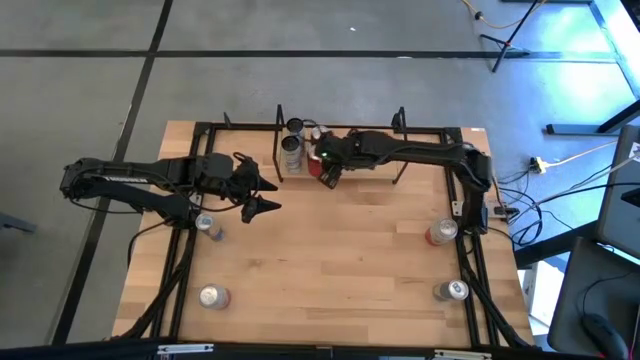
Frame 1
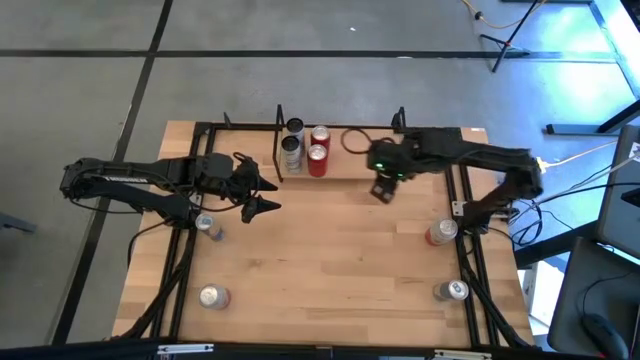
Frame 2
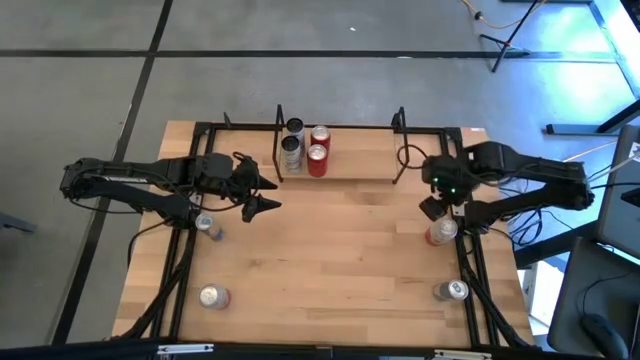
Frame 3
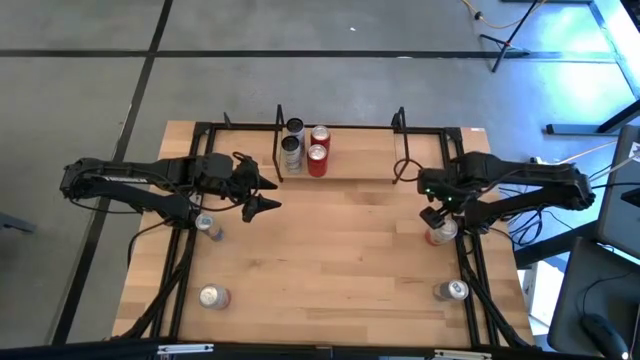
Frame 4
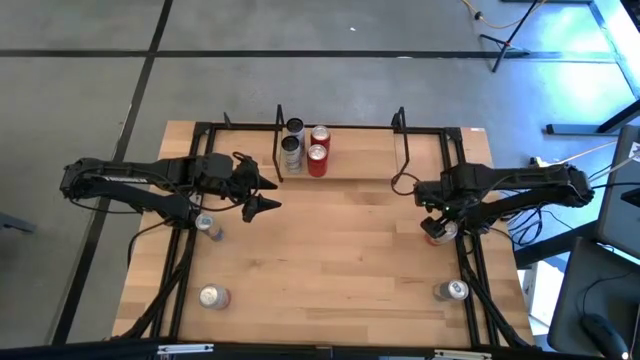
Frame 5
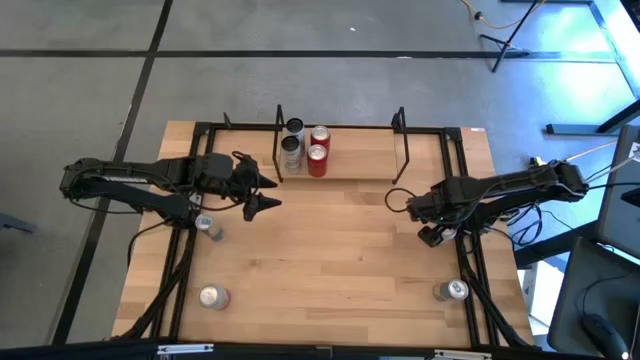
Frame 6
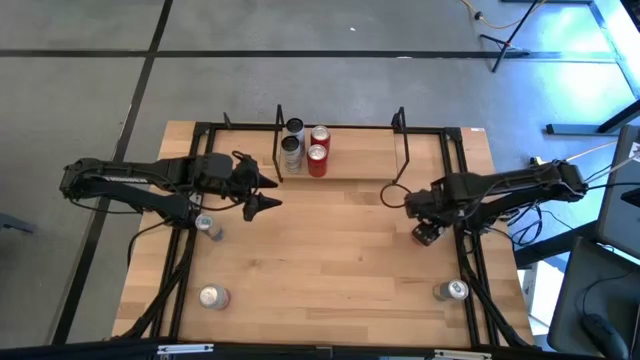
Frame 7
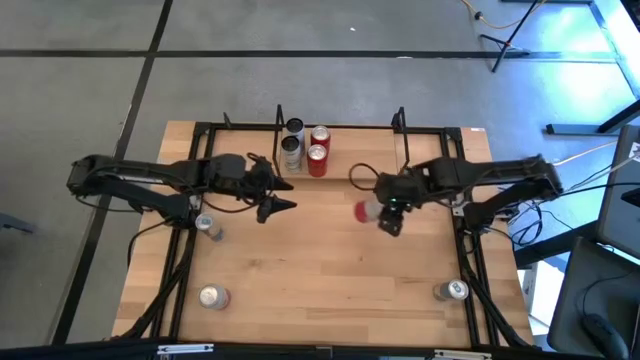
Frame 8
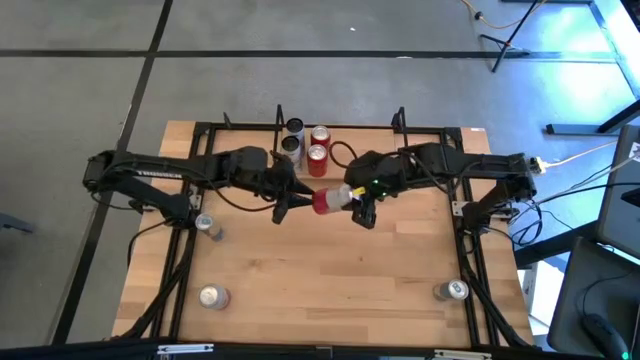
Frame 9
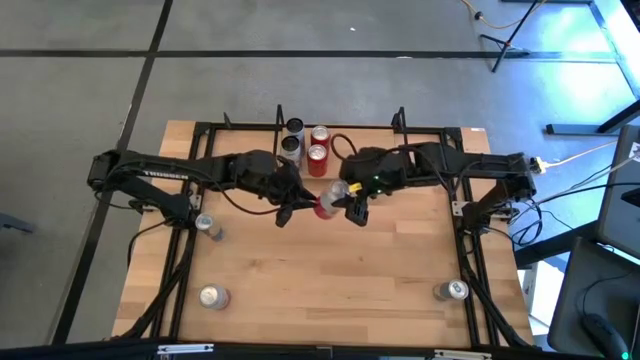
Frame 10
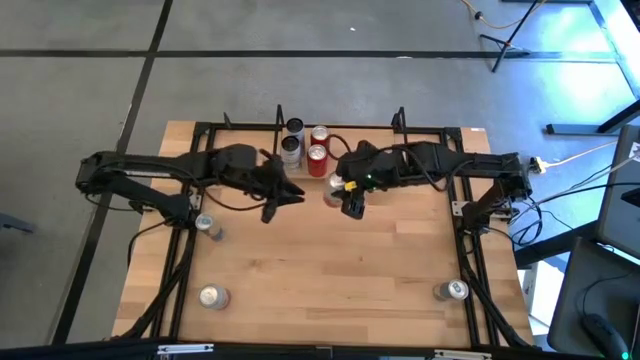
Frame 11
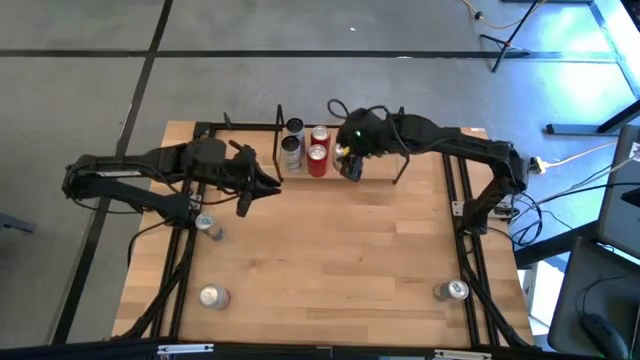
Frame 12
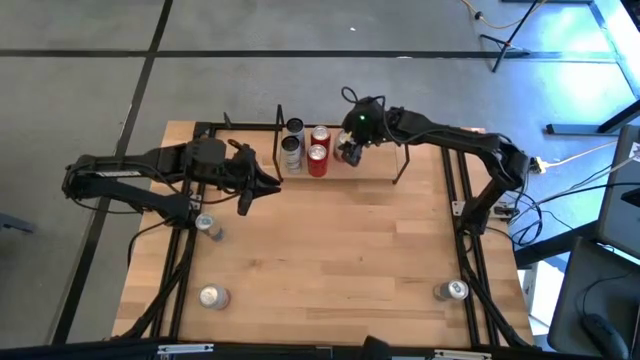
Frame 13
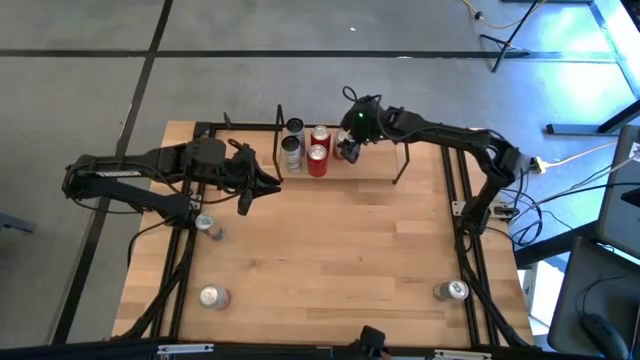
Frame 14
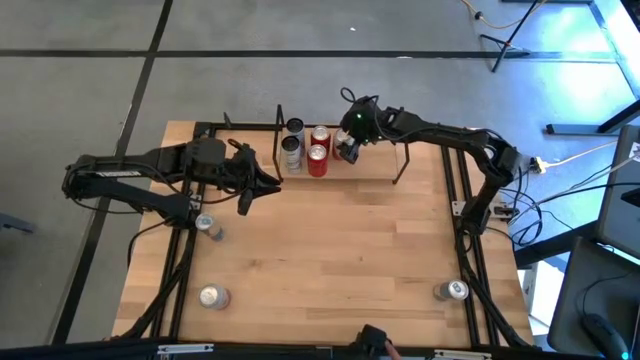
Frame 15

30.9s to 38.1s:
Task: Place canned beverage on shelf
Put the right pink soda can on the shelf

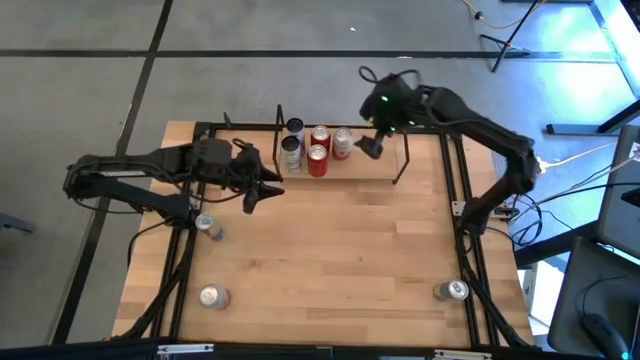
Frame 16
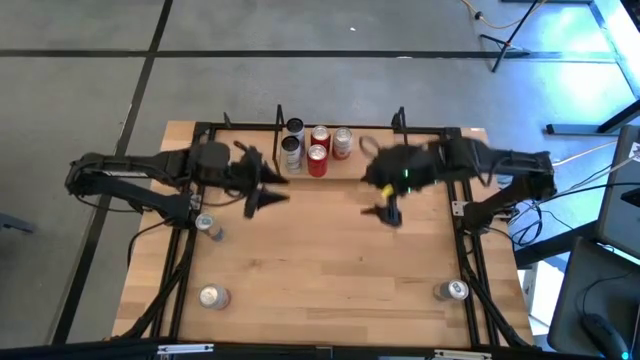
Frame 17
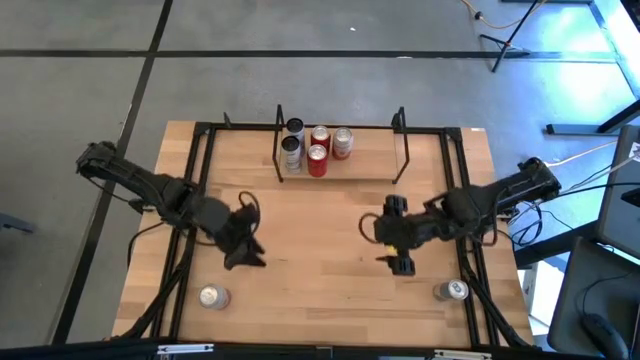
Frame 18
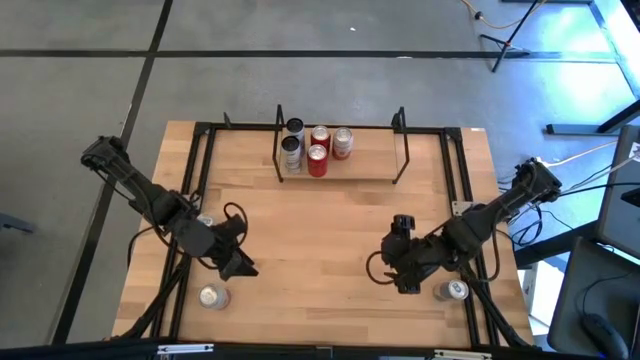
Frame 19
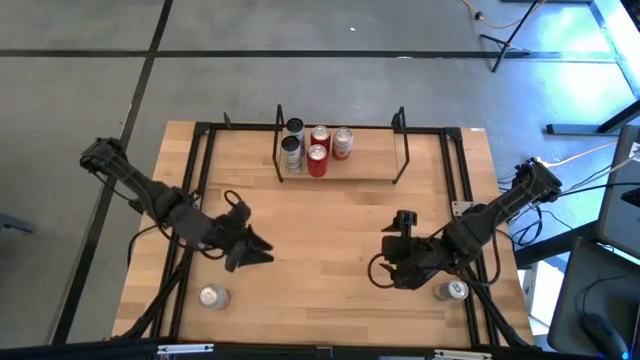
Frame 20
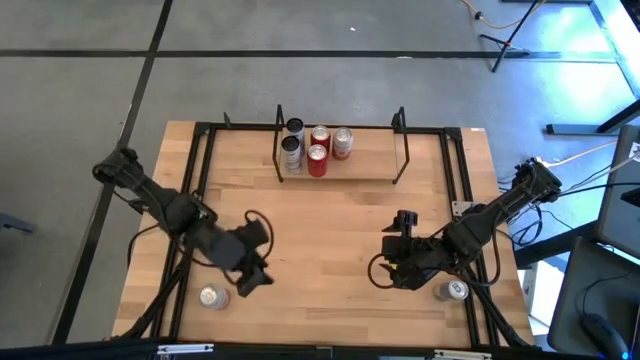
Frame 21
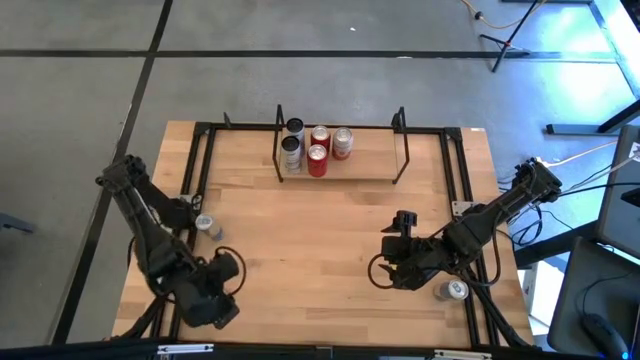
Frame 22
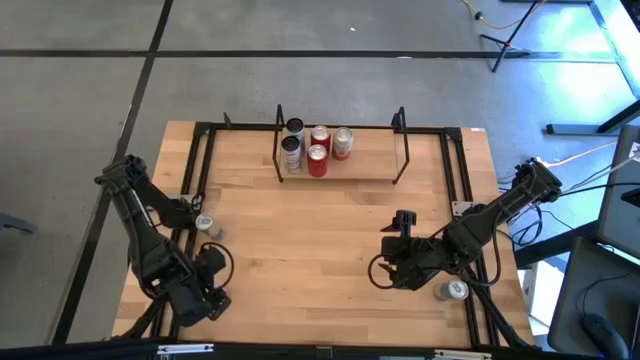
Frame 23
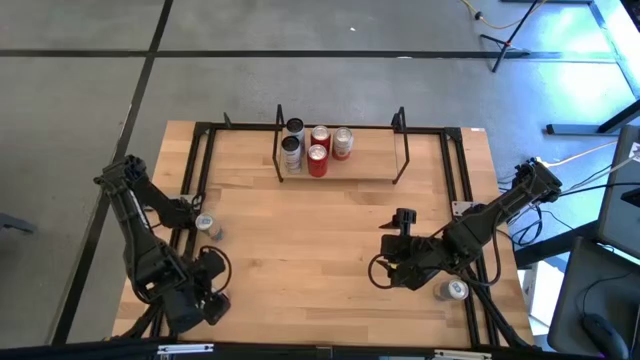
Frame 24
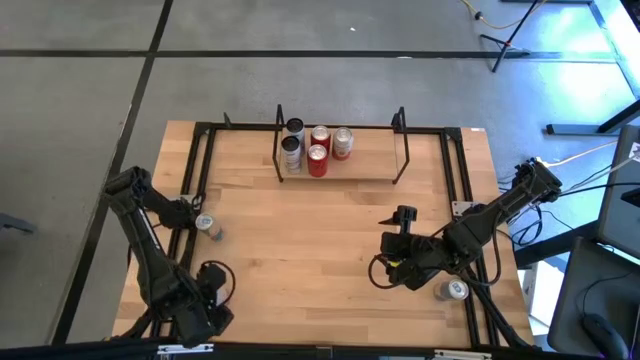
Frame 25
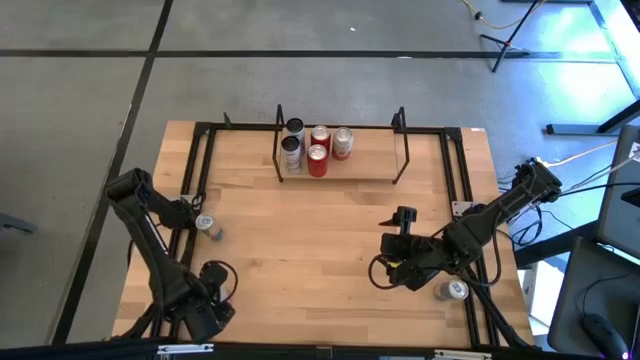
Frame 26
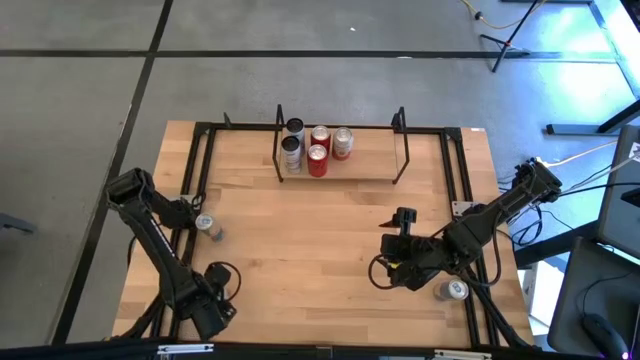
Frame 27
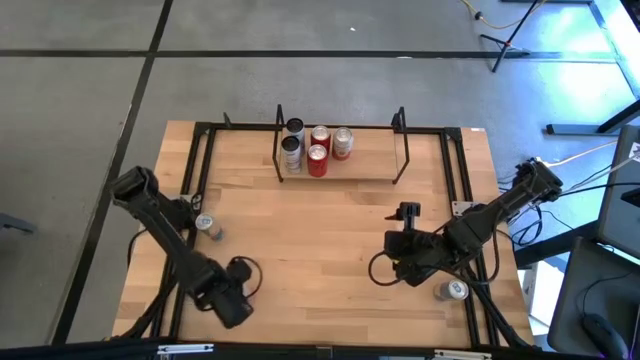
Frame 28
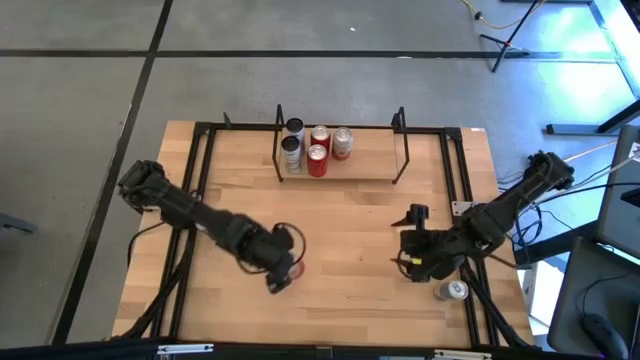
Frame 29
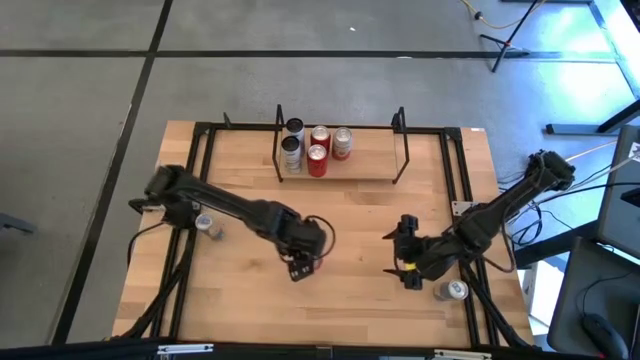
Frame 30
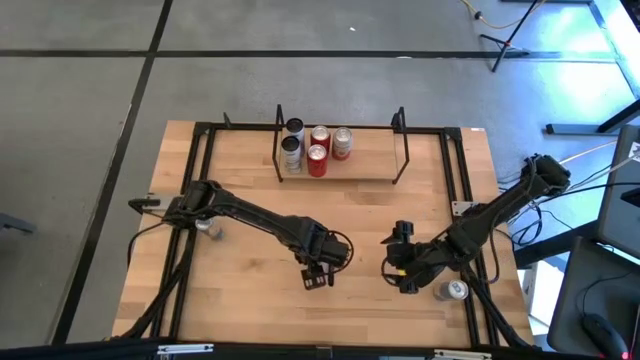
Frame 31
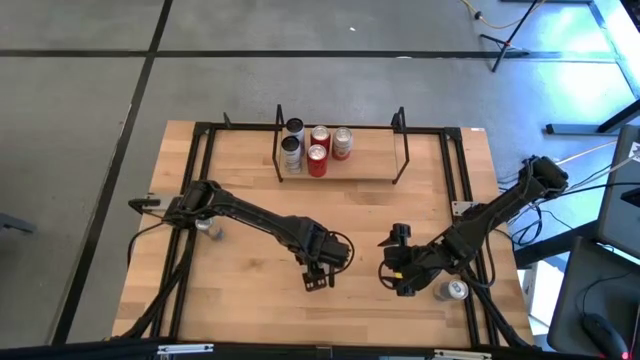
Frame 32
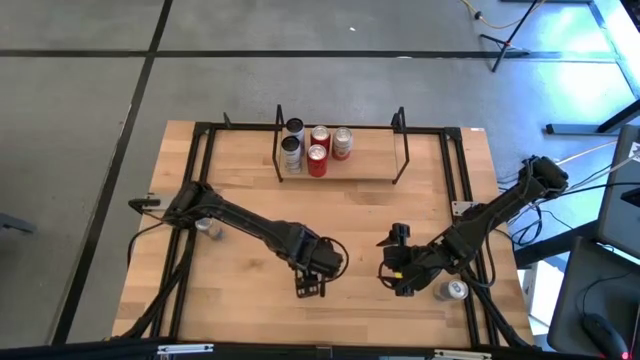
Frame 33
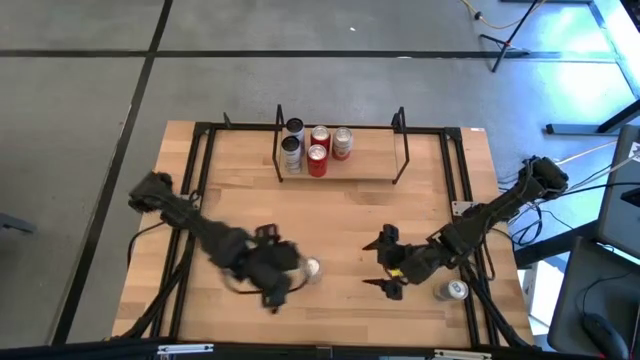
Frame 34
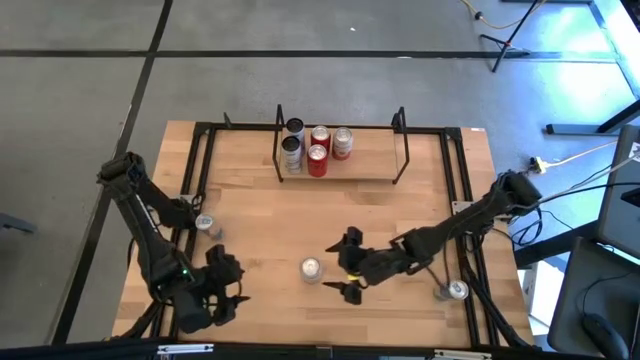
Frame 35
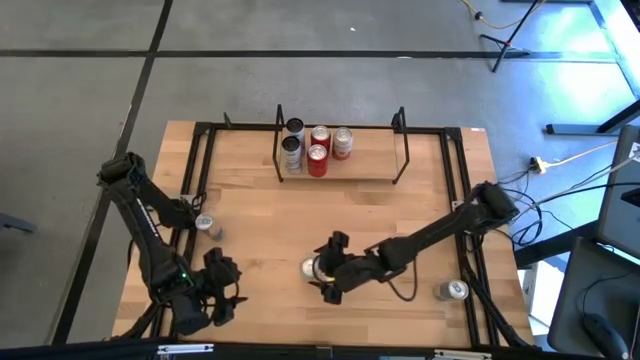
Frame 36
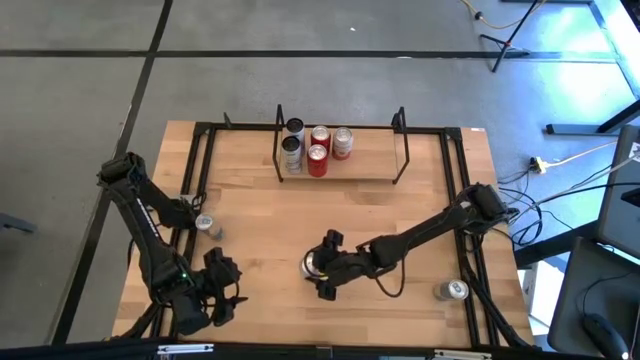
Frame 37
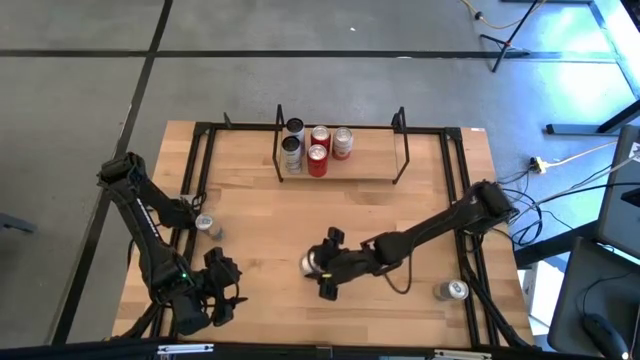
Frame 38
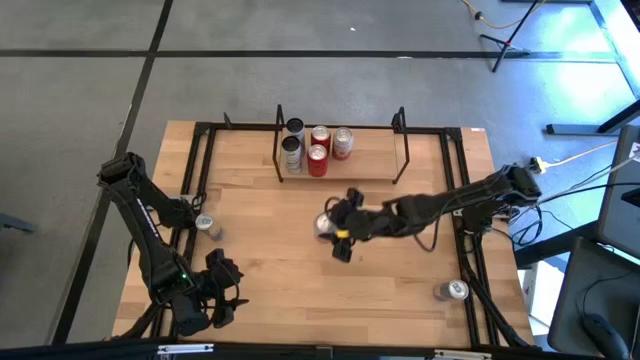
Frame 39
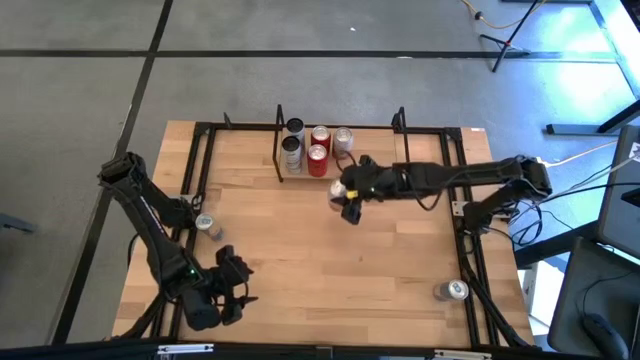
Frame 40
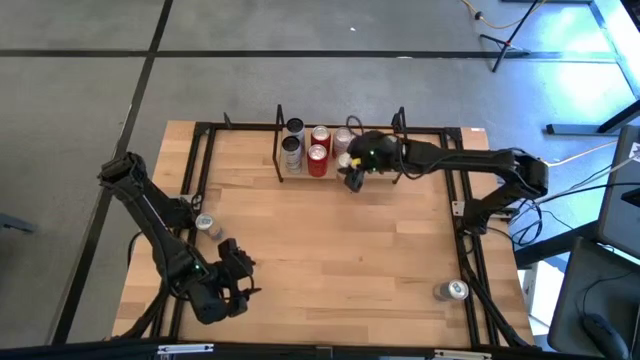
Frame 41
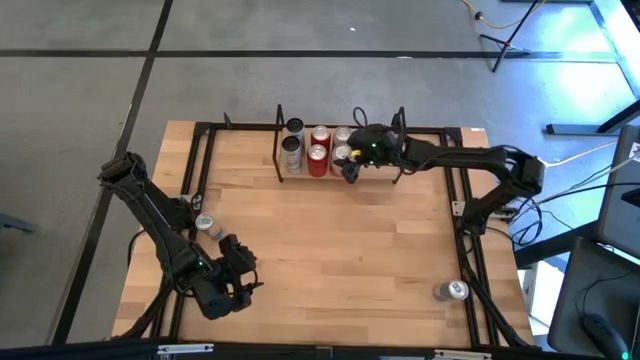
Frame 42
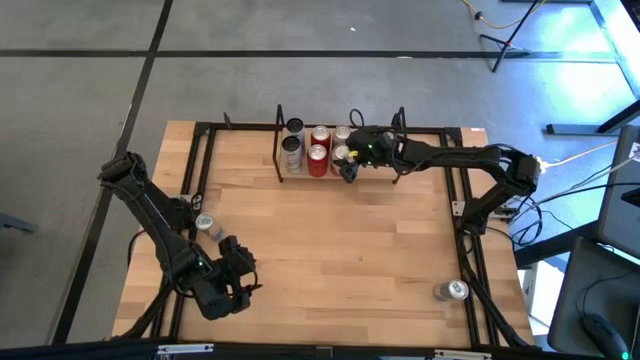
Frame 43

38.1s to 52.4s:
Put the pink soda can on the shelf
